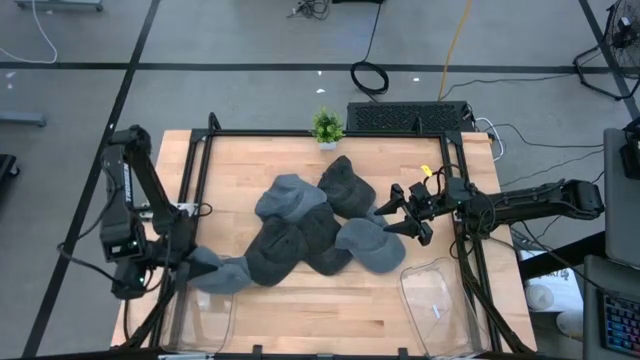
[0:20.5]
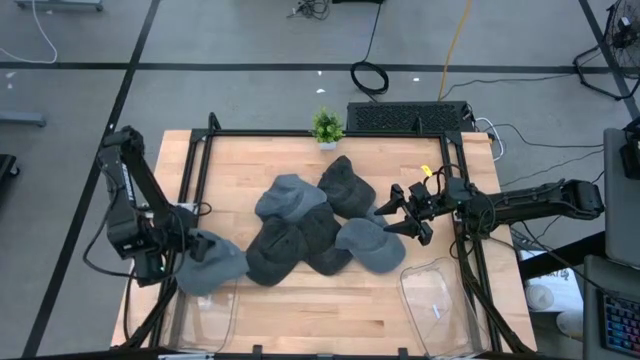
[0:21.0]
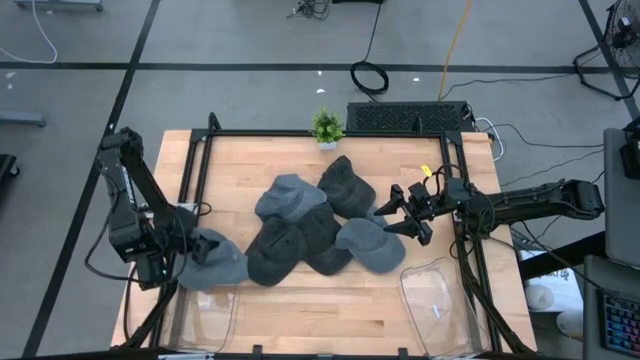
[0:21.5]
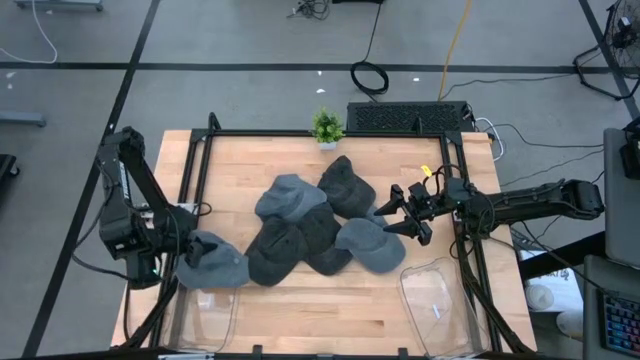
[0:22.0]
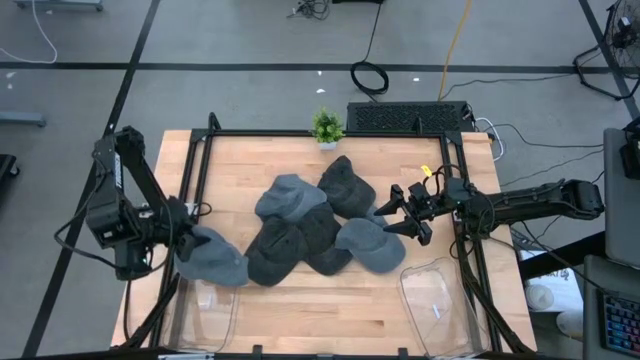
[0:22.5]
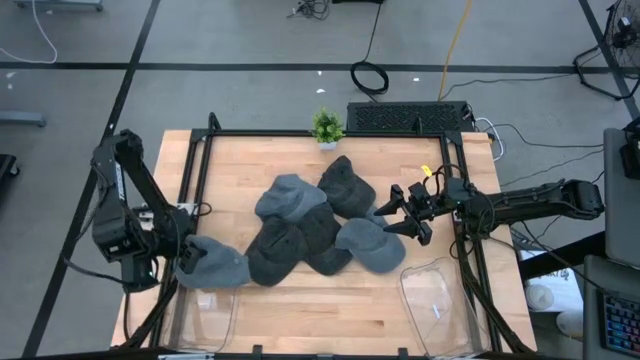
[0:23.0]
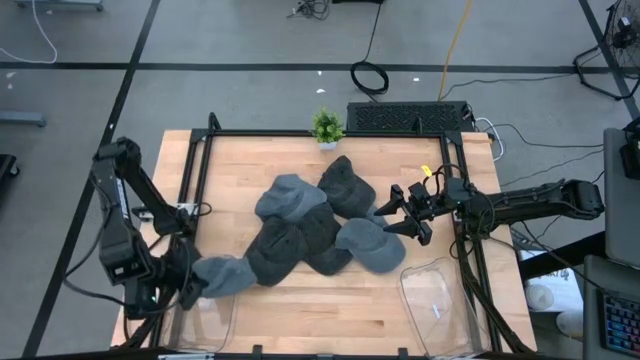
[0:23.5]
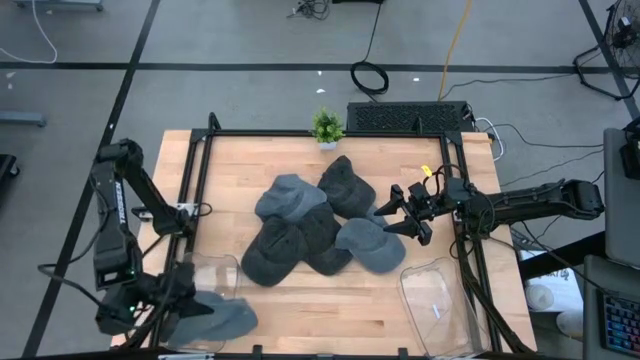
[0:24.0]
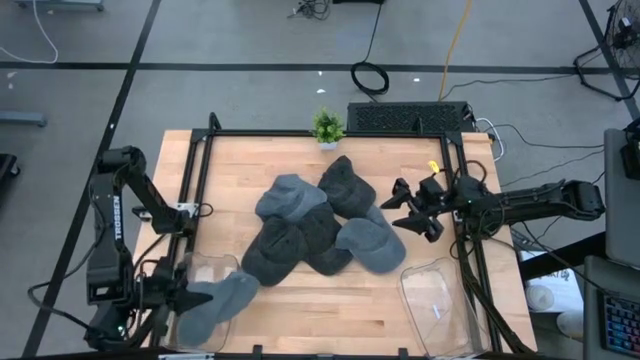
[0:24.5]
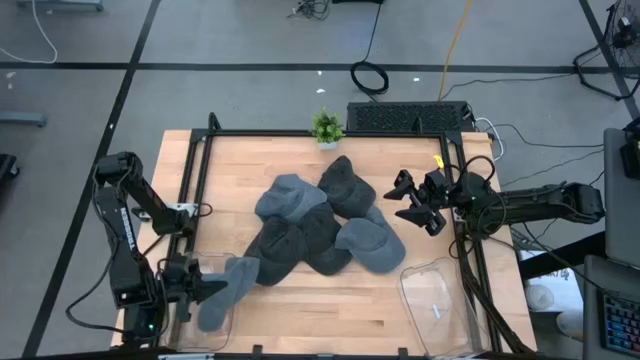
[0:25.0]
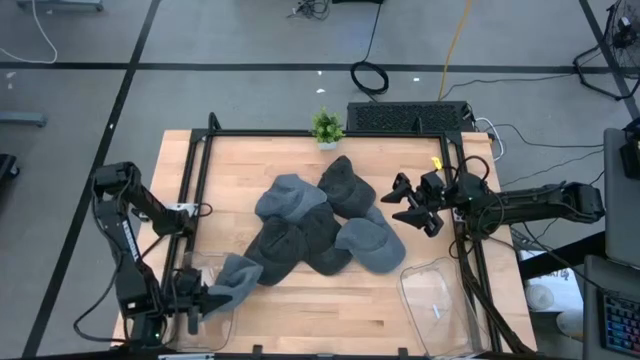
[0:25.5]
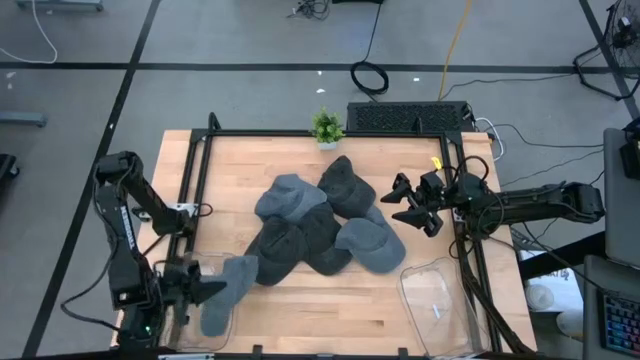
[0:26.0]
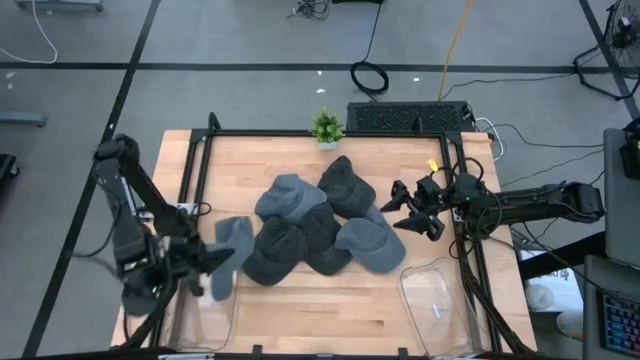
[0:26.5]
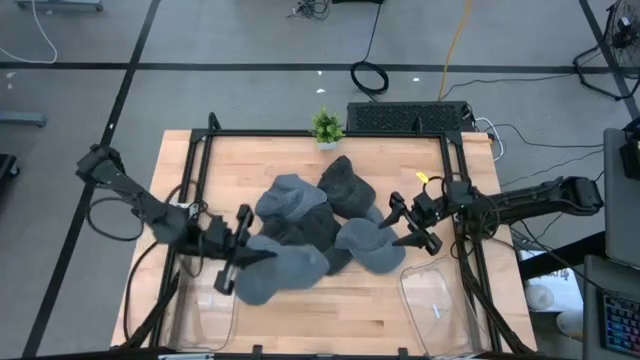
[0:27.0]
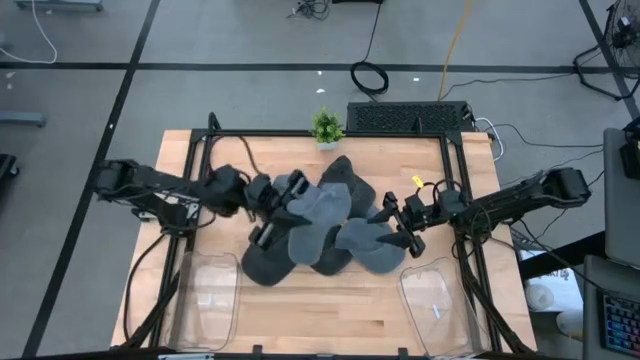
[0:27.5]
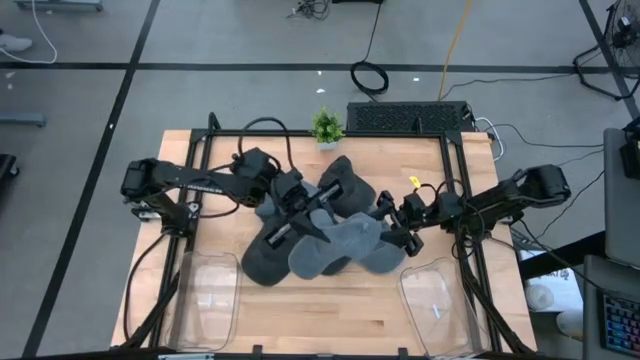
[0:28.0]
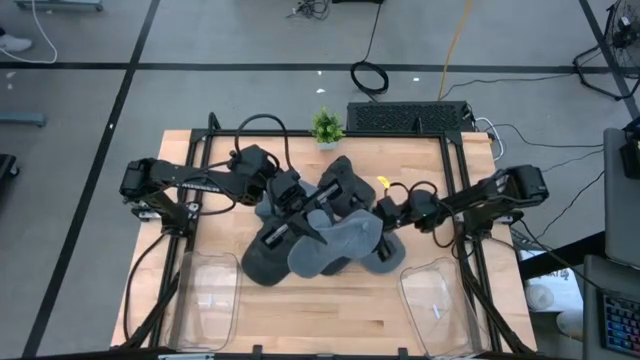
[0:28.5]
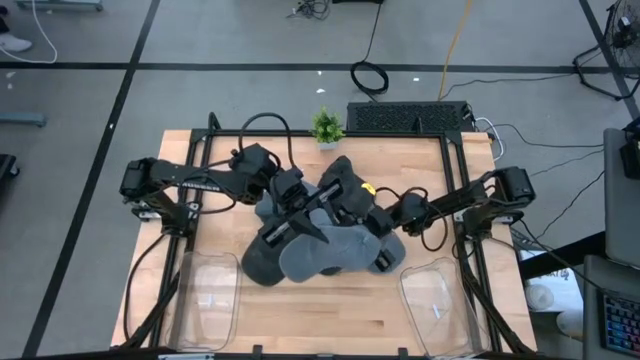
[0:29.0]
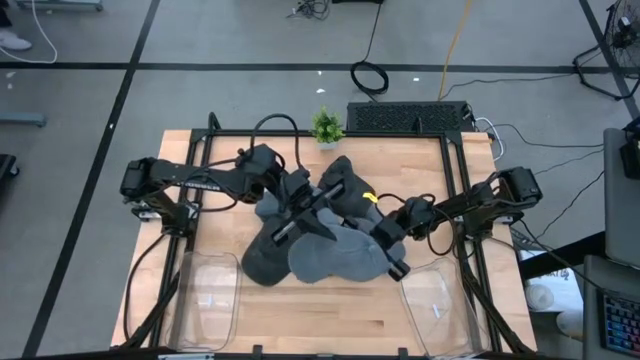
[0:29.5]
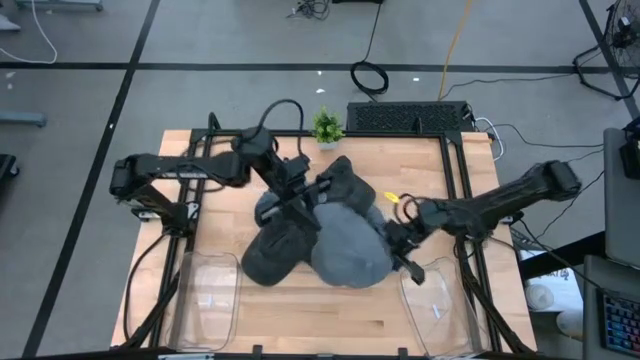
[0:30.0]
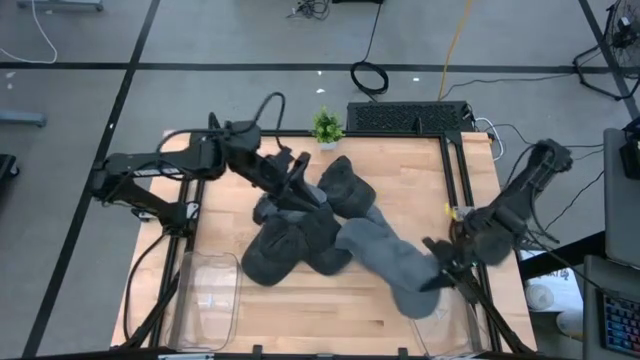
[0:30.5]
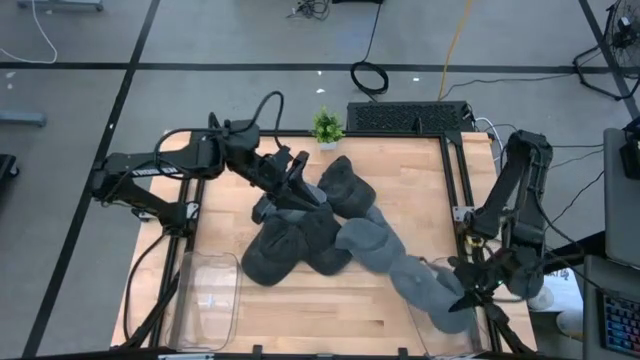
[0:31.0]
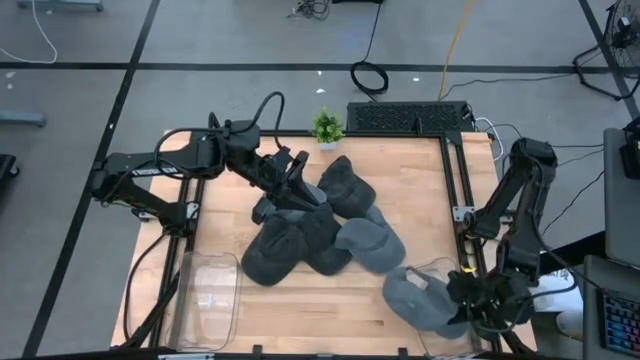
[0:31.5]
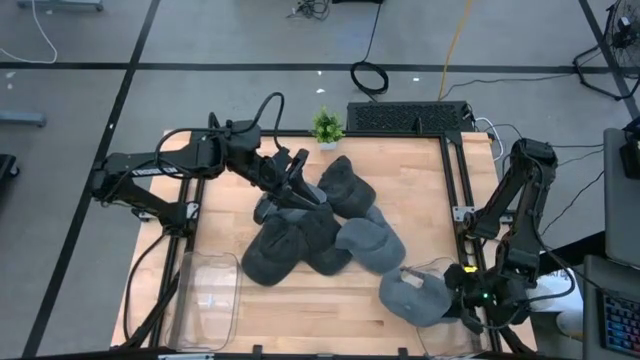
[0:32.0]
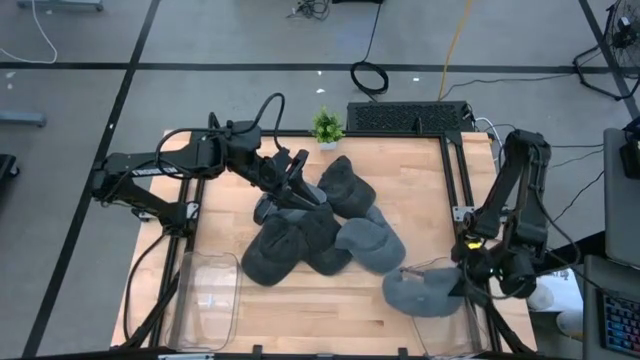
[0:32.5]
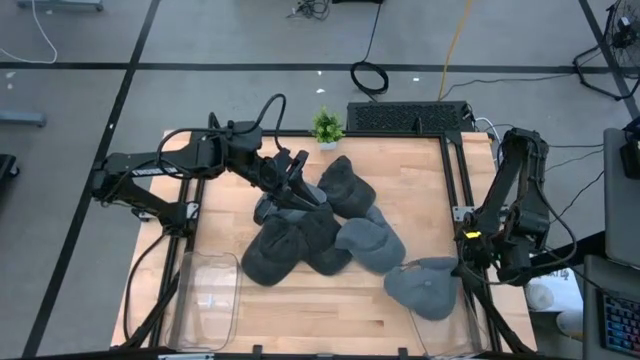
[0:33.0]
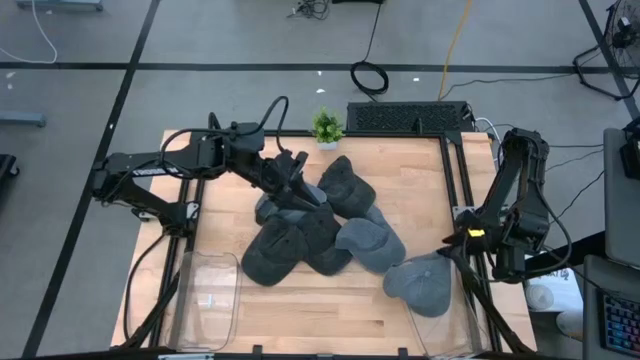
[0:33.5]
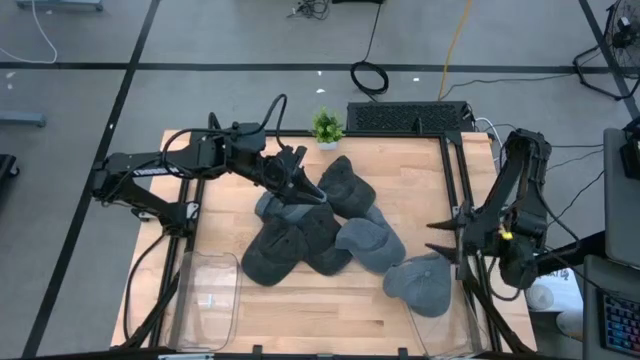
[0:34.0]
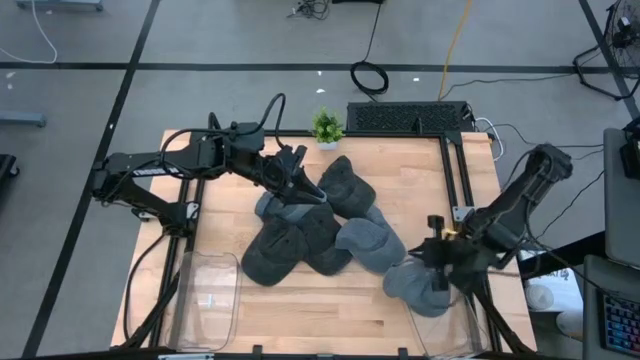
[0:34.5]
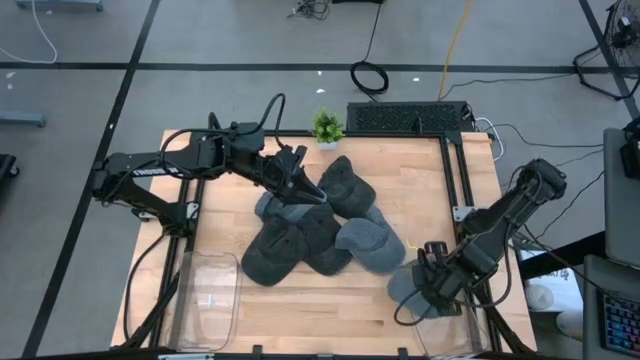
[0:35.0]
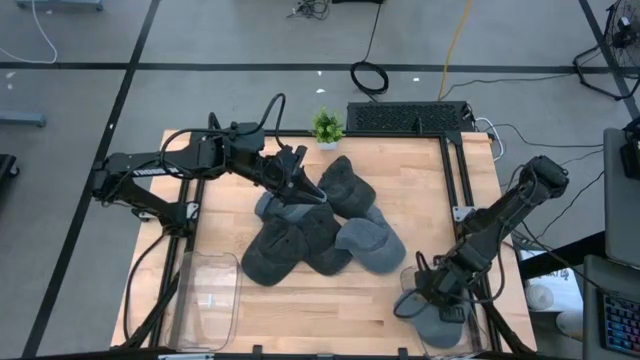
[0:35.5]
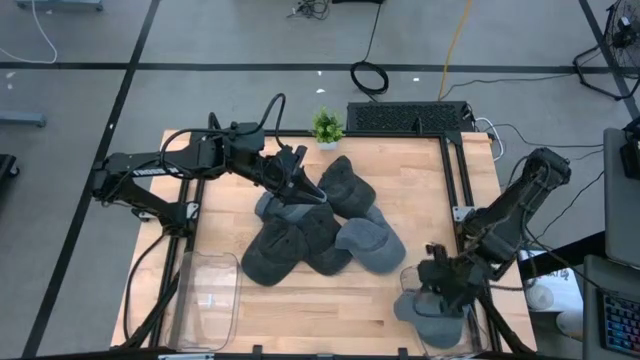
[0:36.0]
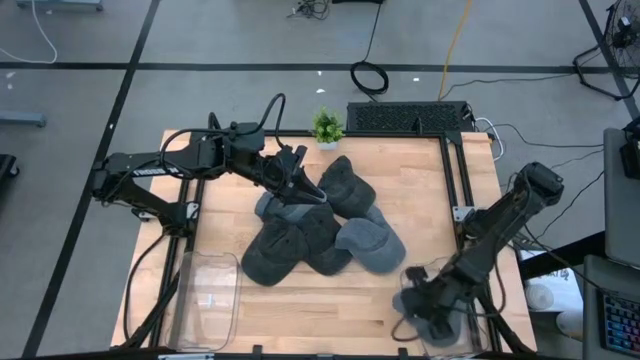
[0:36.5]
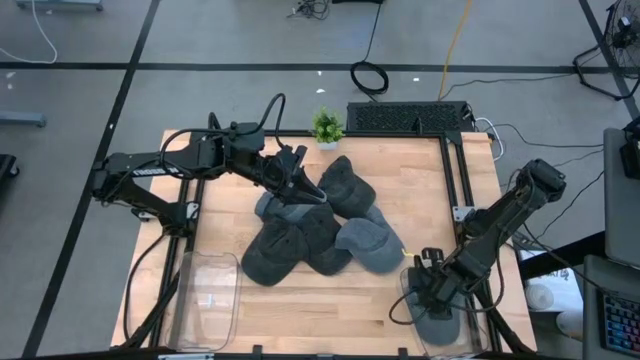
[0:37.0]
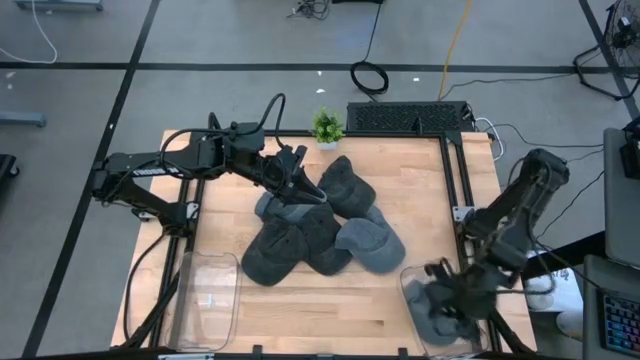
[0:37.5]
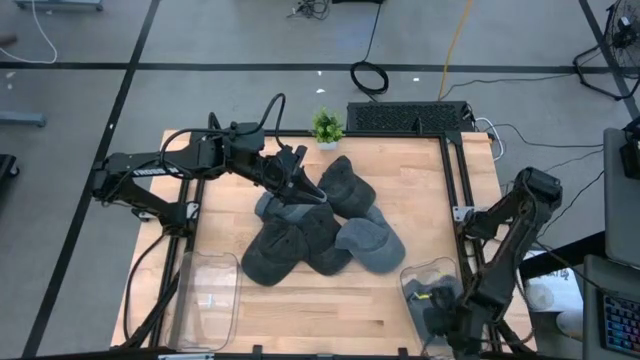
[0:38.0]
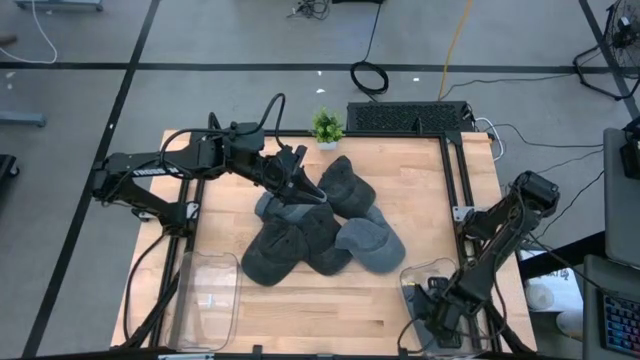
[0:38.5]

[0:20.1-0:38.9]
Task: Pick & Place hat
Put the top gray cap into the right transparent bin
